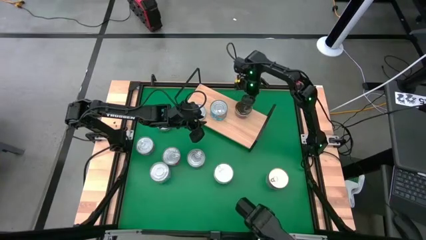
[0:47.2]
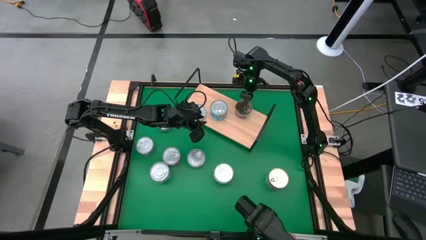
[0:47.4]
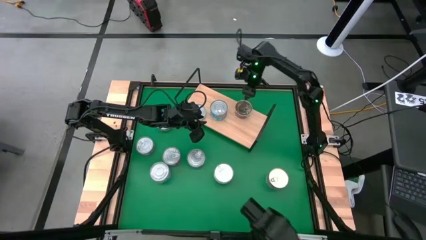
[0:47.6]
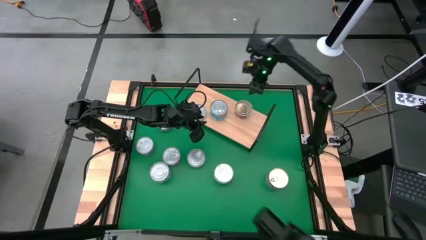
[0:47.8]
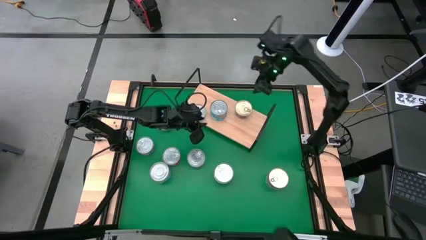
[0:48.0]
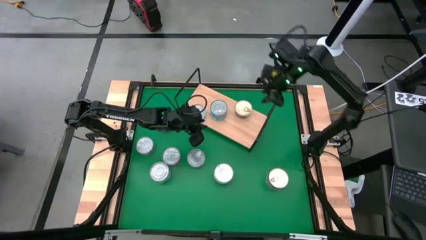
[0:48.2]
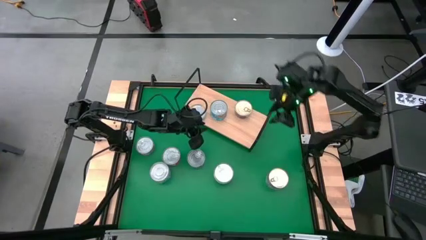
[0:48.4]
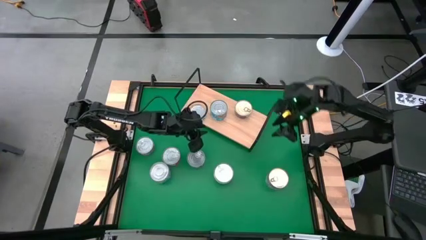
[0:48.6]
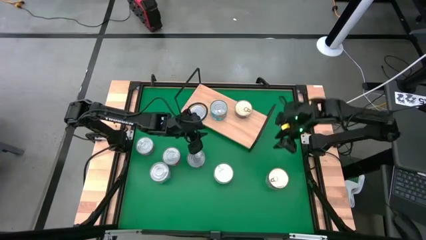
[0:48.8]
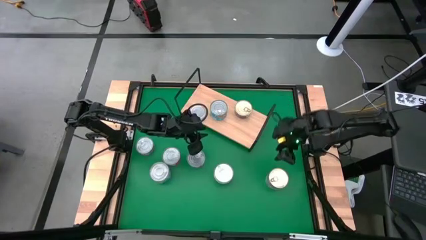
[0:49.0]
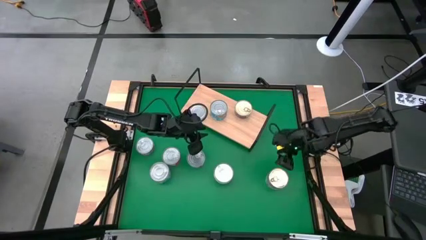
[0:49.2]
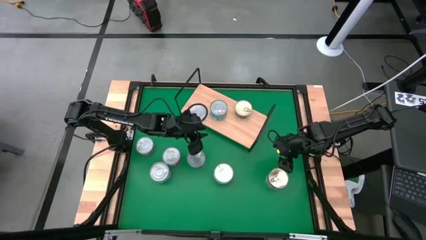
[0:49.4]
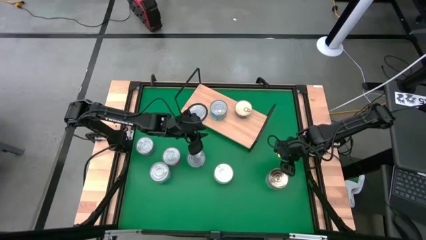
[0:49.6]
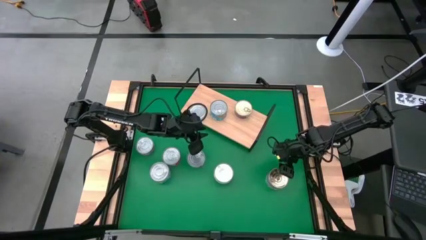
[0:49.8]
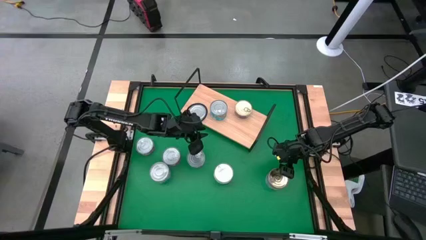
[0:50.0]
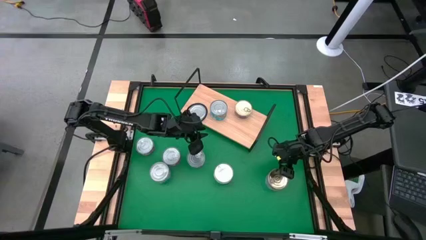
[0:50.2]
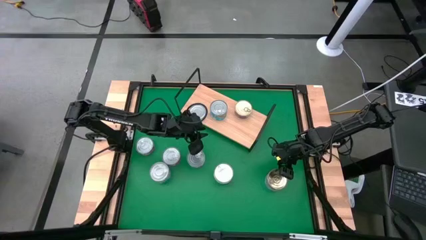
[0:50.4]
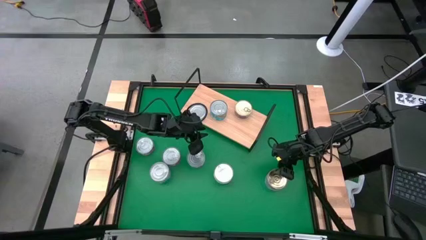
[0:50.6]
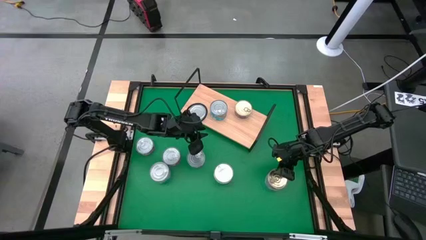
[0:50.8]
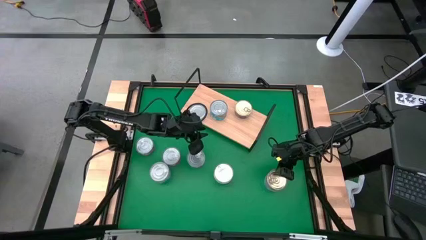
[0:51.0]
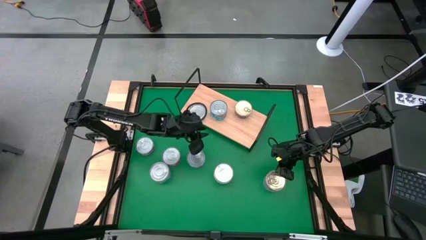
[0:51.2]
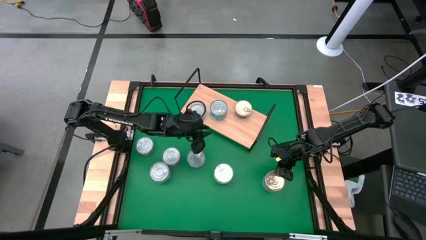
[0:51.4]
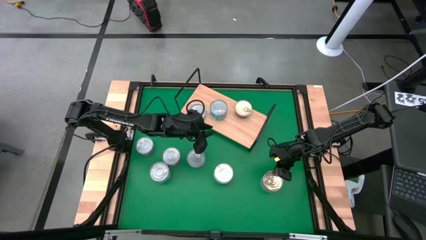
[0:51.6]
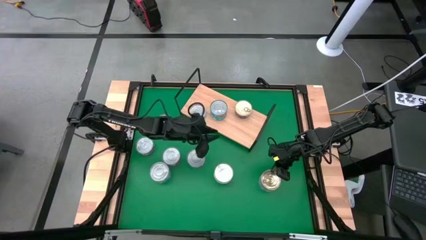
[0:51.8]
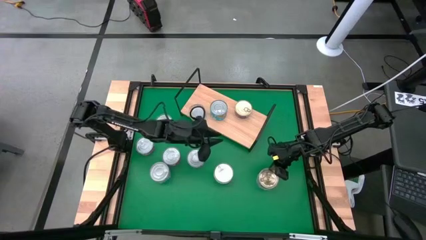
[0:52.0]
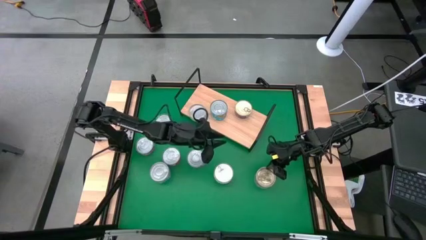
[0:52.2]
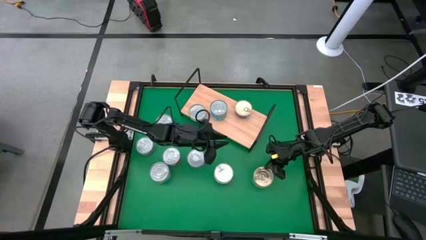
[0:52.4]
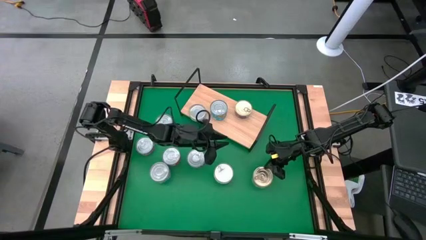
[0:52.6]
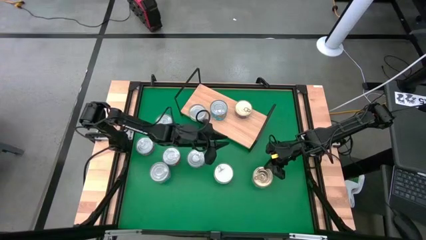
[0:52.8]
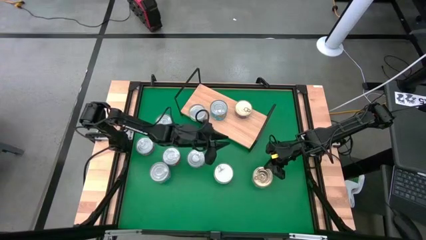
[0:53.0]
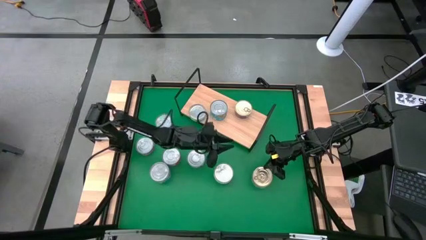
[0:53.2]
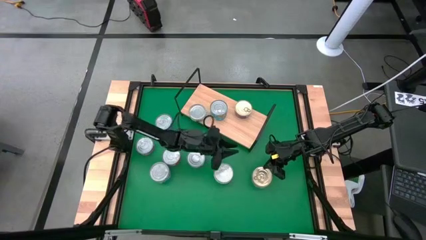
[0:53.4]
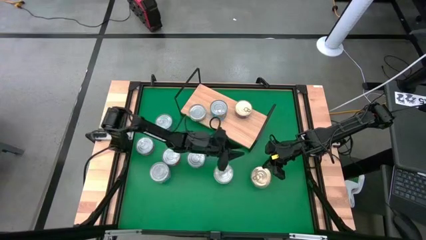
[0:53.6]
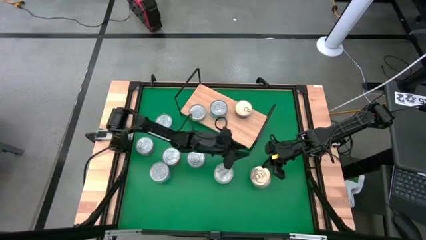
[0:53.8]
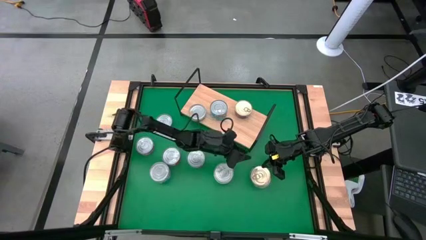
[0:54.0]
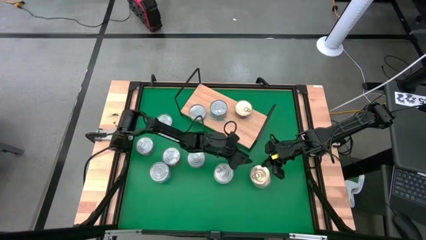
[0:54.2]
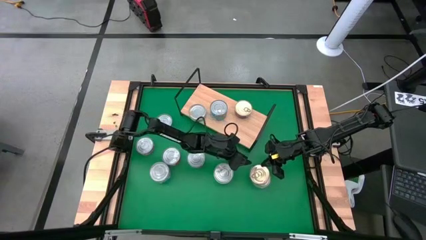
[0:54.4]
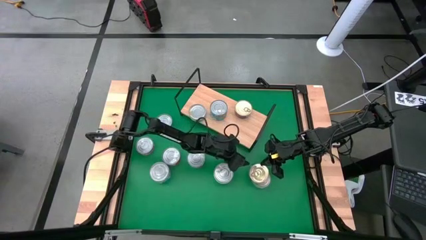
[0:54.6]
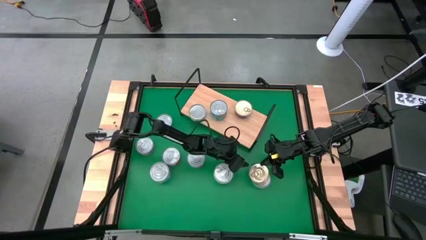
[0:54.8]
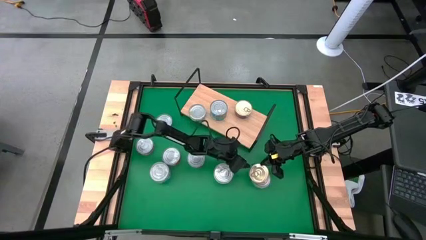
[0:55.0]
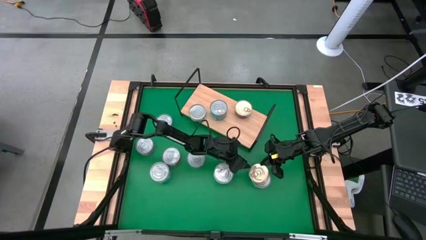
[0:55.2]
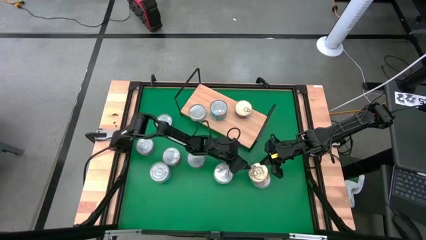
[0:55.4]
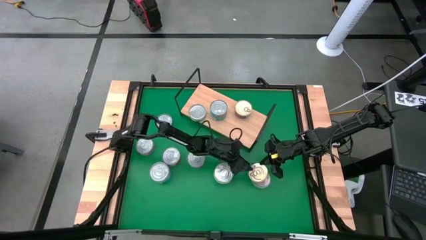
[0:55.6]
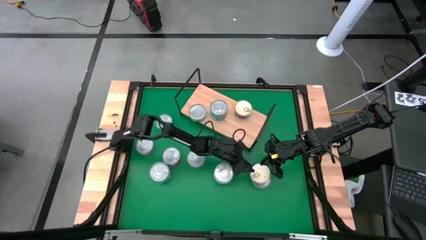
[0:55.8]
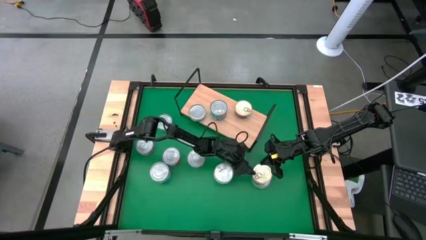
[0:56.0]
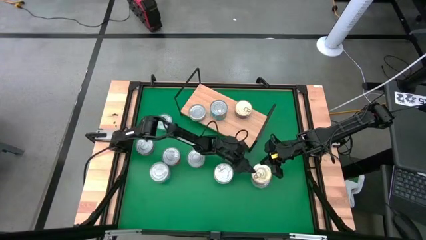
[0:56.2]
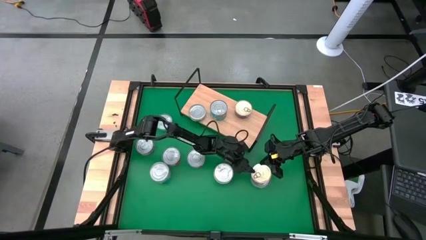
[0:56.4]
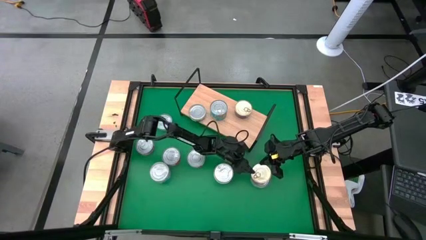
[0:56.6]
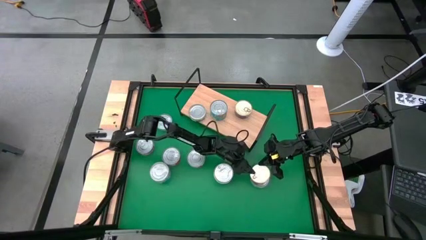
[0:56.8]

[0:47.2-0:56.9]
Task: Stack canned seafood by type on shelf
Stack the blue-pink tuna can on top of the blue-pink tuna can on the shelf

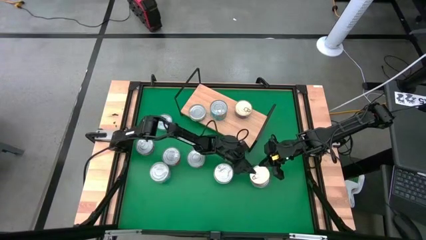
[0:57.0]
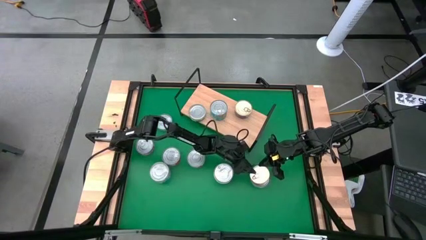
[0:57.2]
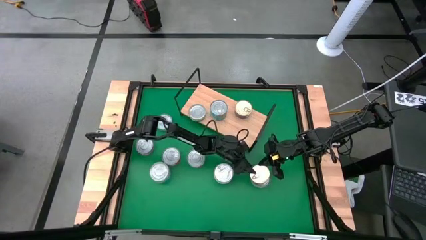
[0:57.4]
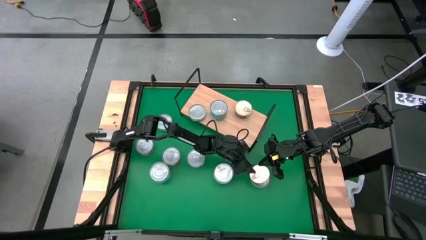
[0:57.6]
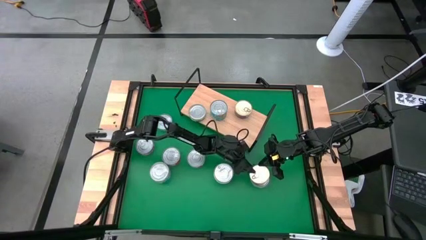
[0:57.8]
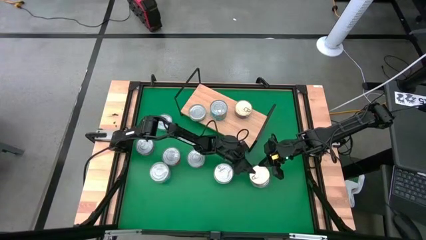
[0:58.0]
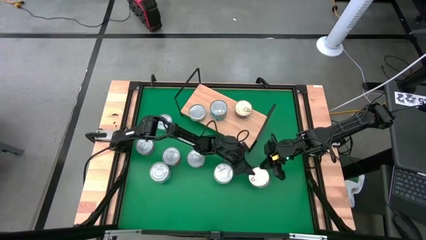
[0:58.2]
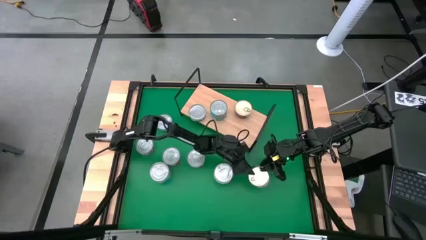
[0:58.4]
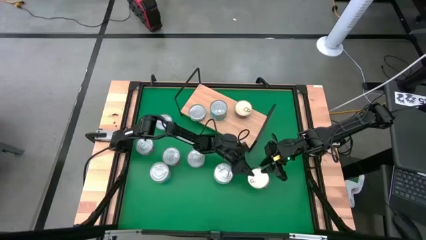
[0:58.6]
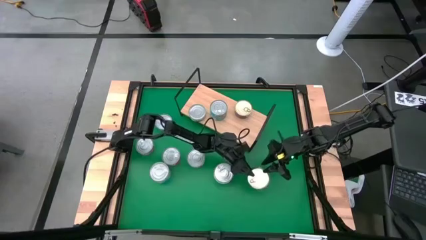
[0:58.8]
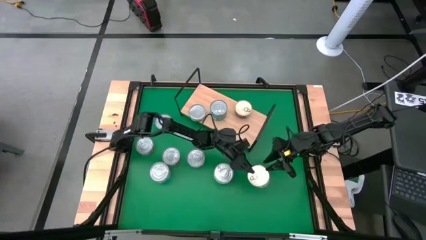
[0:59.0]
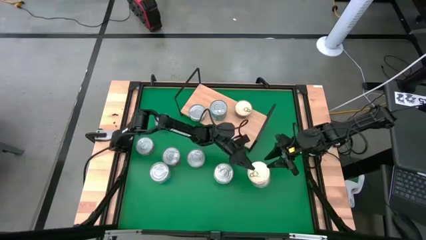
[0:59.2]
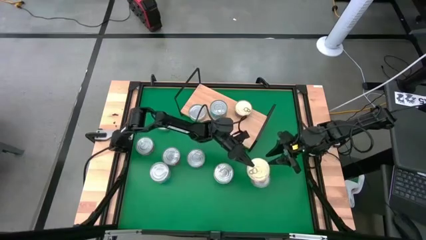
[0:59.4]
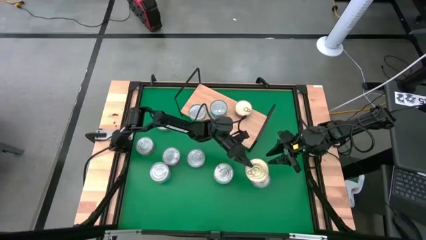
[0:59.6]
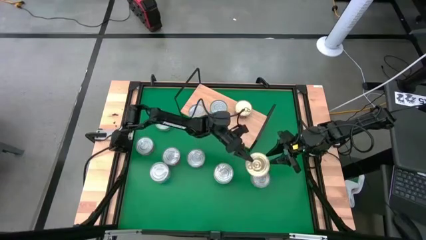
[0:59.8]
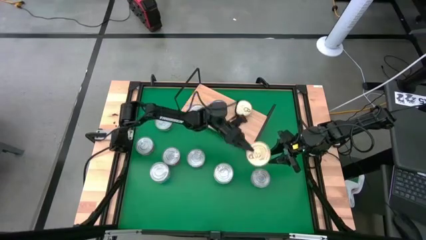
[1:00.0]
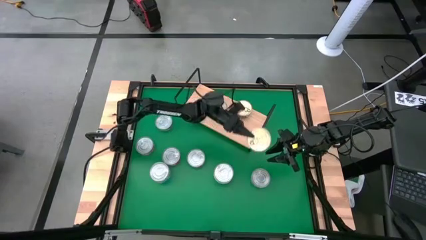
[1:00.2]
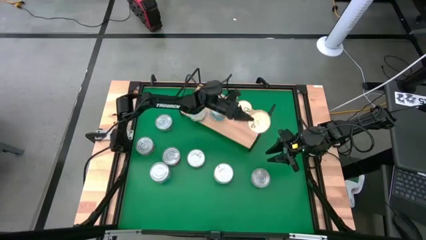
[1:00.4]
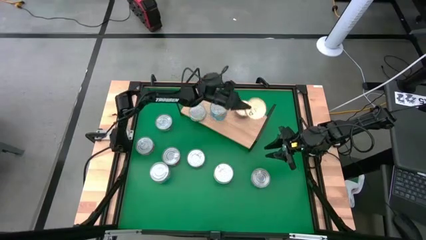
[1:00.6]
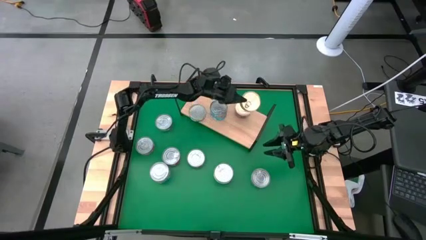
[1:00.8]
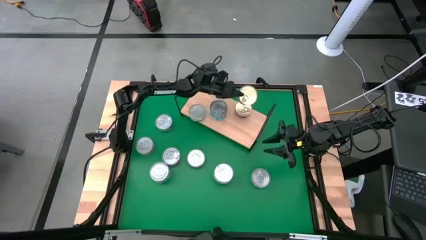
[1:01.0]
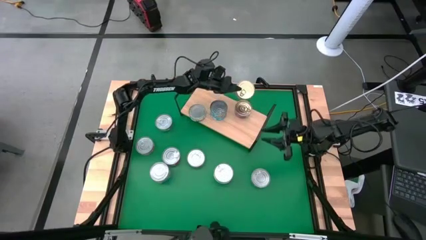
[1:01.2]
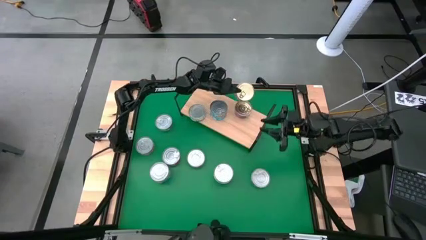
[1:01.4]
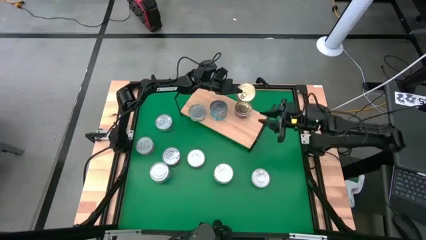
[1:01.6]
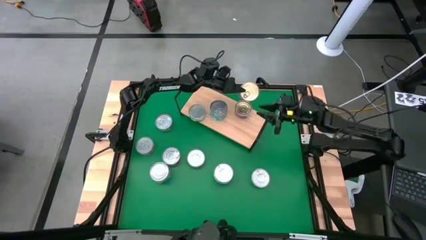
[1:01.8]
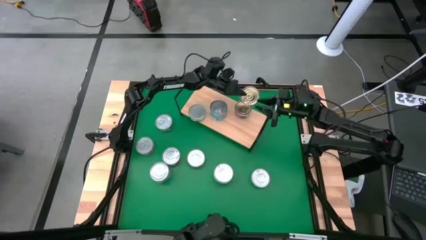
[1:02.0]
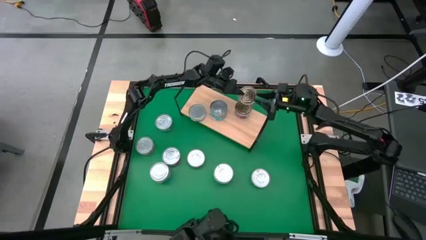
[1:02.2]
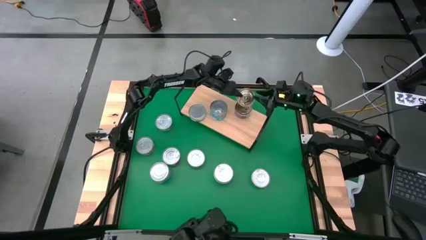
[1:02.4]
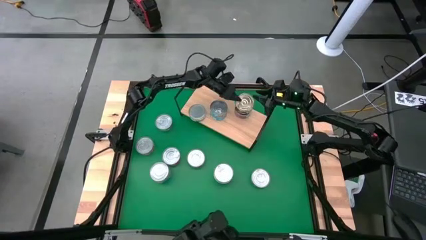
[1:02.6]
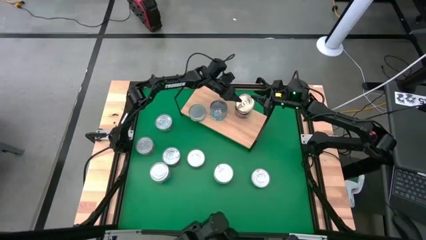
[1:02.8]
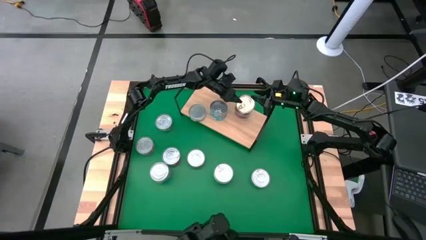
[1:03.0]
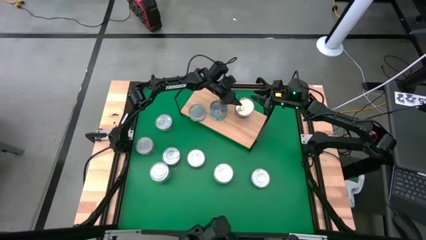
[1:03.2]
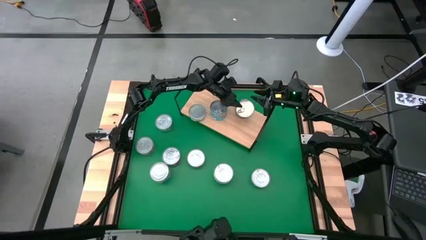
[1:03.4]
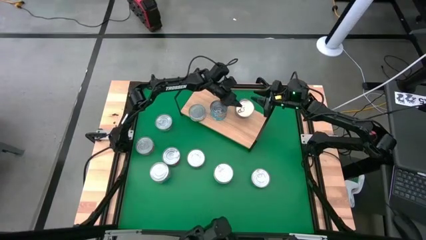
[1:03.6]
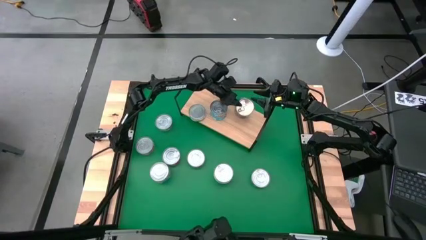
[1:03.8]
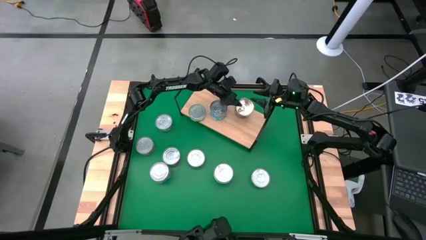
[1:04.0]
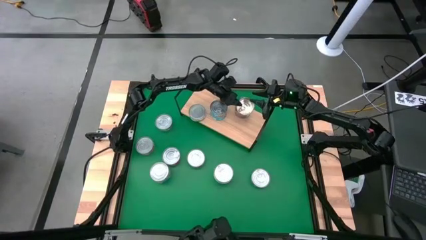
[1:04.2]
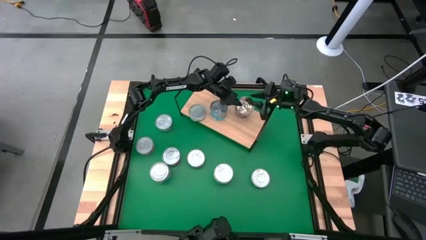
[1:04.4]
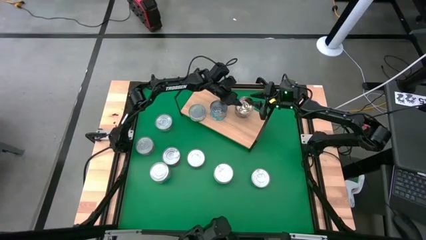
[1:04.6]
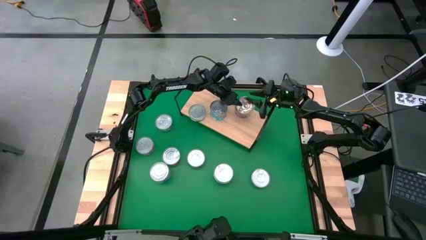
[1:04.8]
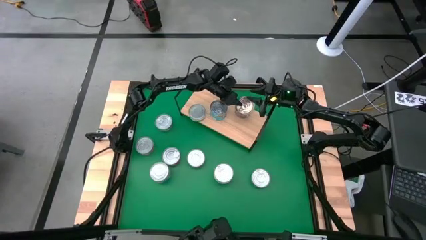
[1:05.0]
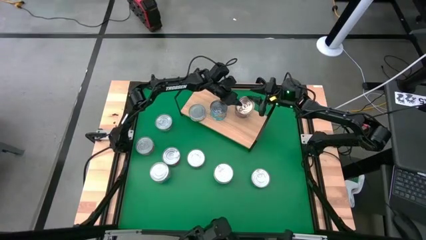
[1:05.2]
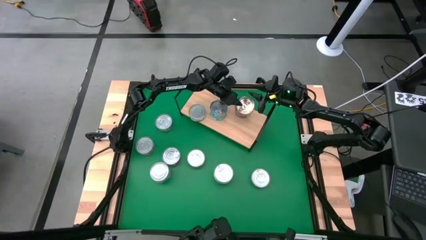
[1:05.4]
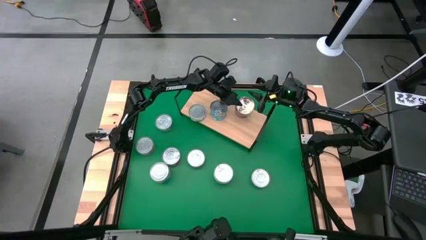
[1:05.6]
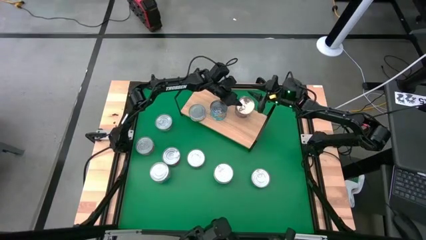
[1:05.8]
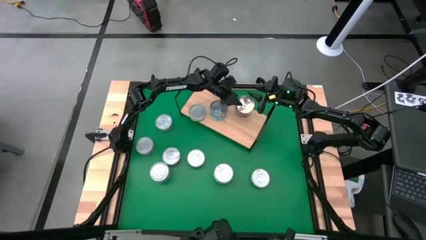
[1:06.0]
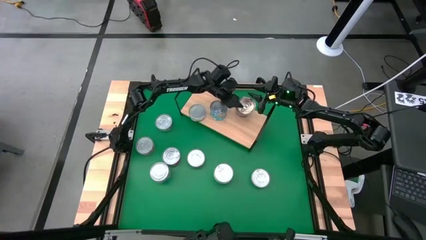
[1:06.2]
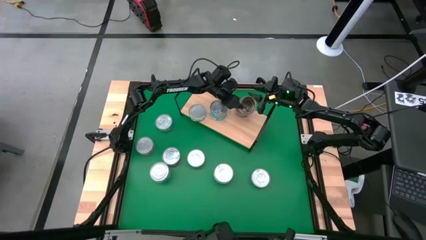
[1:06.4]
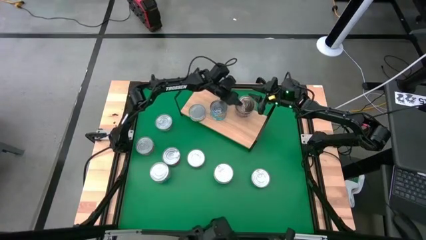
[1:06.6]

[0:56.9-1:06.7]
Stack the blue-pink tuna can on top of the blue-pink tuna can on the shelf
